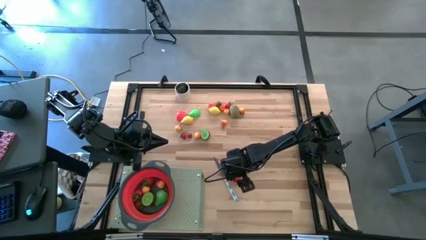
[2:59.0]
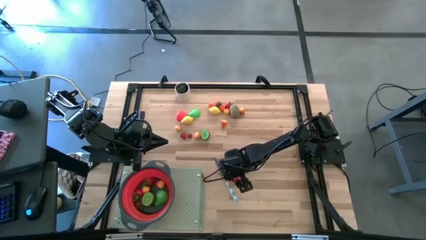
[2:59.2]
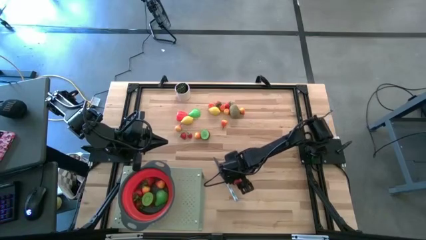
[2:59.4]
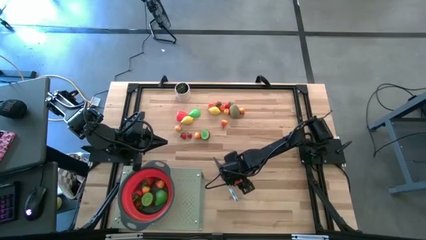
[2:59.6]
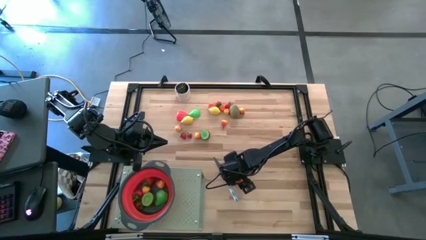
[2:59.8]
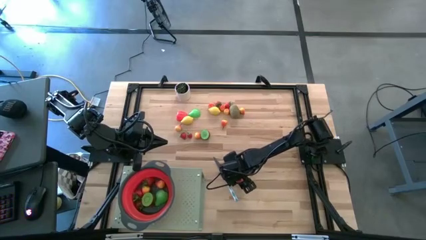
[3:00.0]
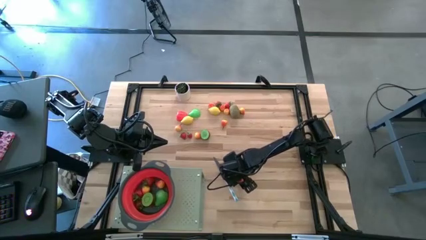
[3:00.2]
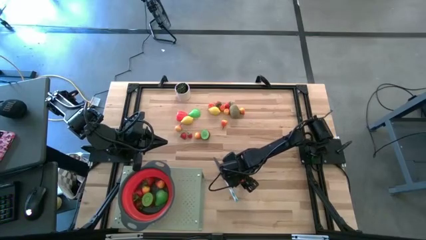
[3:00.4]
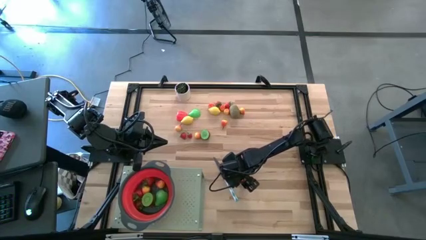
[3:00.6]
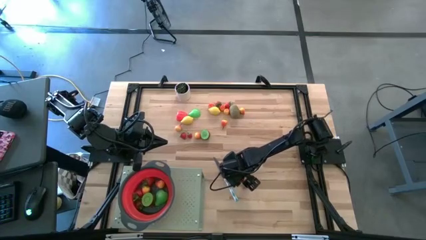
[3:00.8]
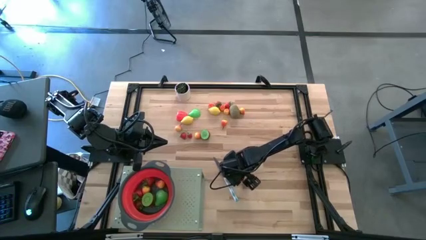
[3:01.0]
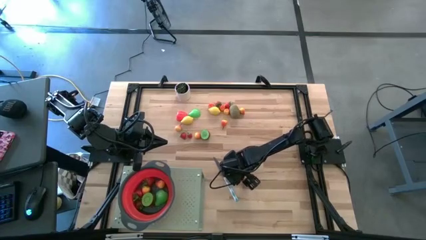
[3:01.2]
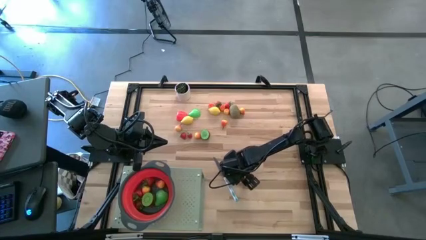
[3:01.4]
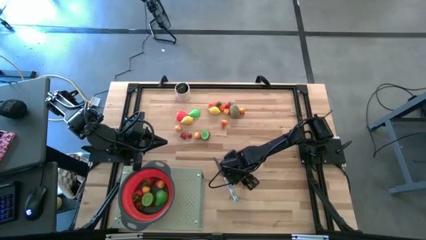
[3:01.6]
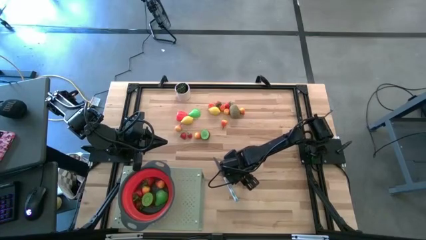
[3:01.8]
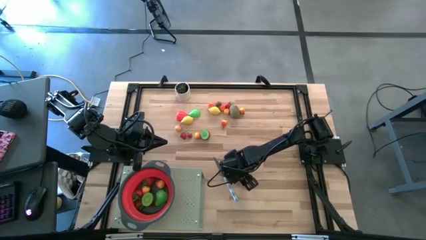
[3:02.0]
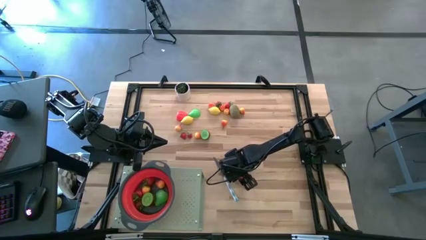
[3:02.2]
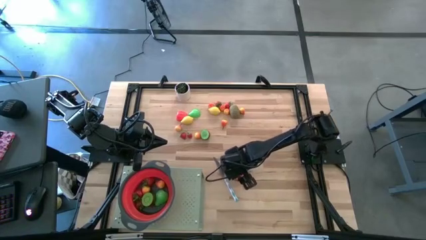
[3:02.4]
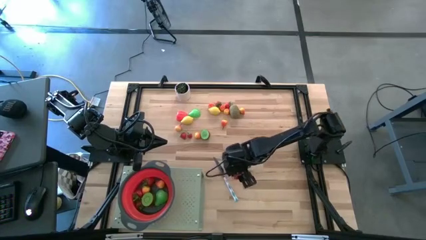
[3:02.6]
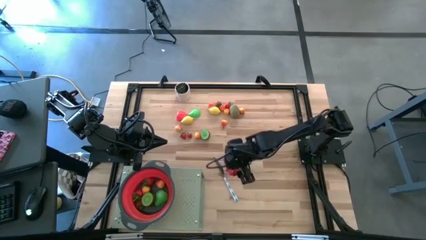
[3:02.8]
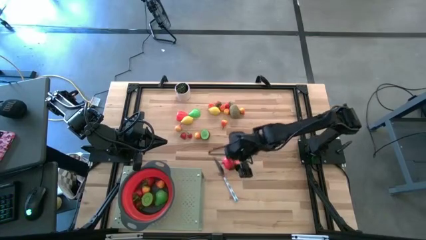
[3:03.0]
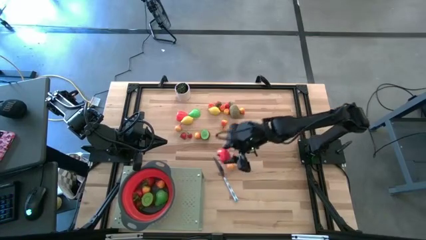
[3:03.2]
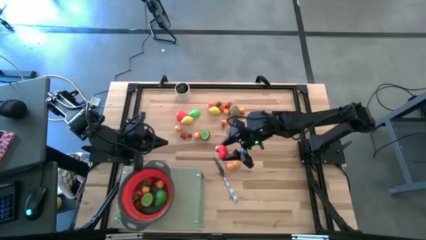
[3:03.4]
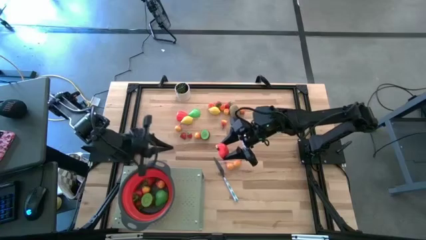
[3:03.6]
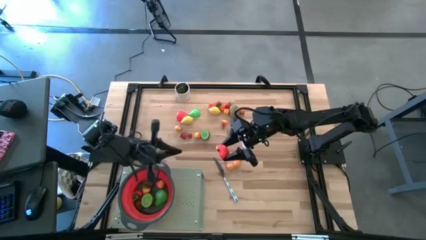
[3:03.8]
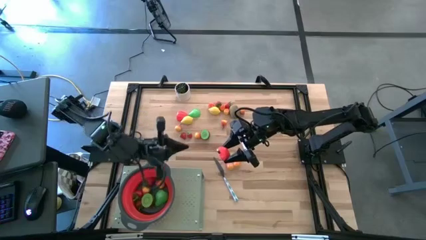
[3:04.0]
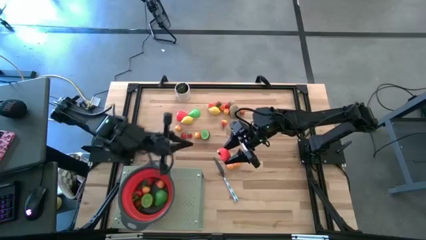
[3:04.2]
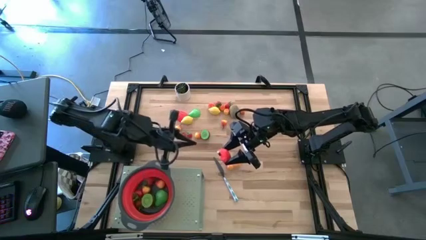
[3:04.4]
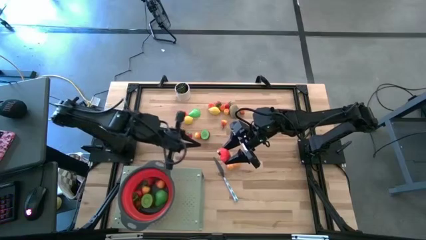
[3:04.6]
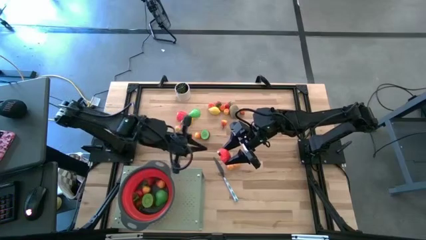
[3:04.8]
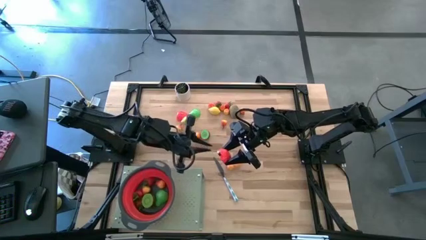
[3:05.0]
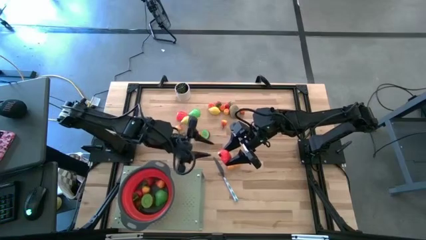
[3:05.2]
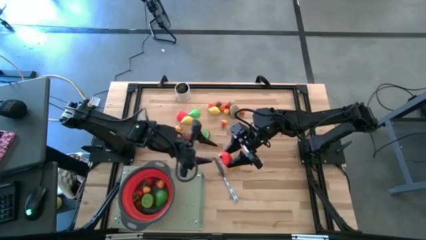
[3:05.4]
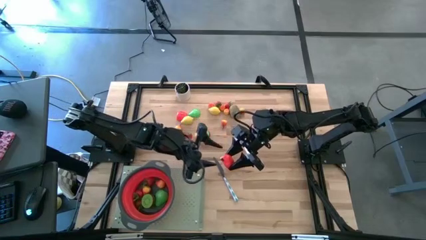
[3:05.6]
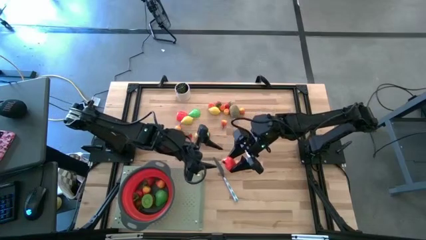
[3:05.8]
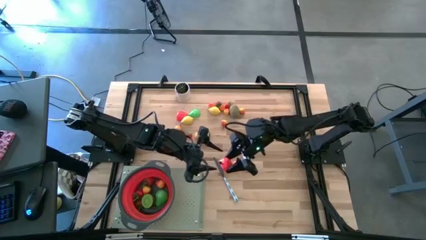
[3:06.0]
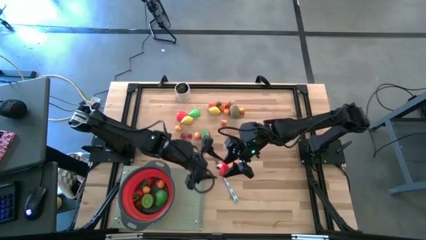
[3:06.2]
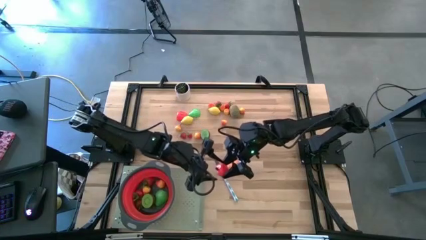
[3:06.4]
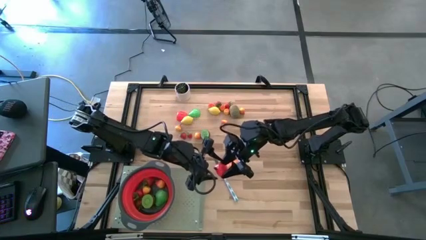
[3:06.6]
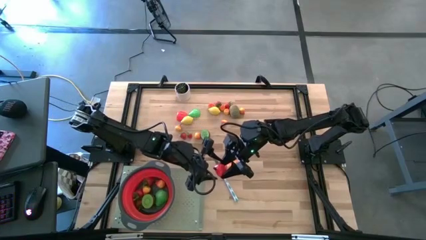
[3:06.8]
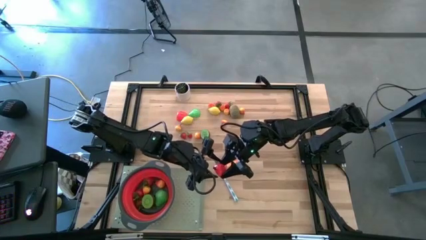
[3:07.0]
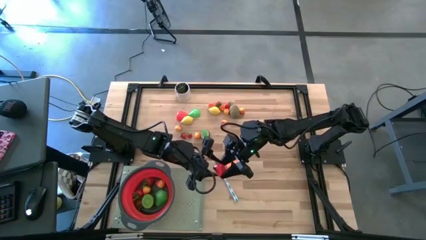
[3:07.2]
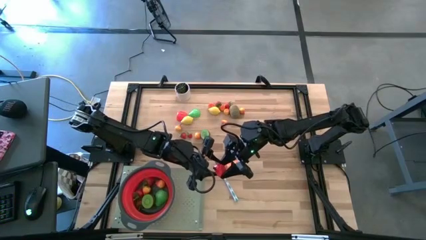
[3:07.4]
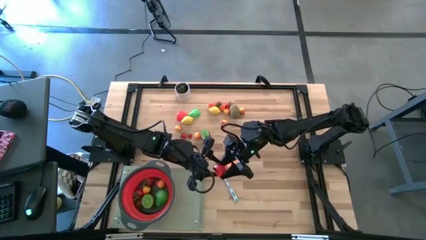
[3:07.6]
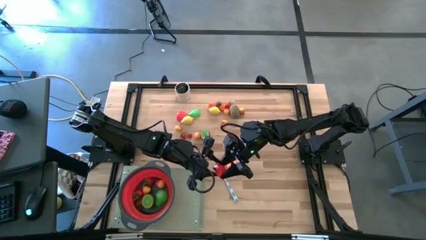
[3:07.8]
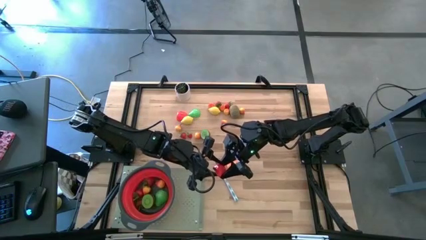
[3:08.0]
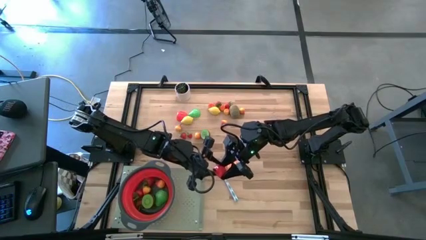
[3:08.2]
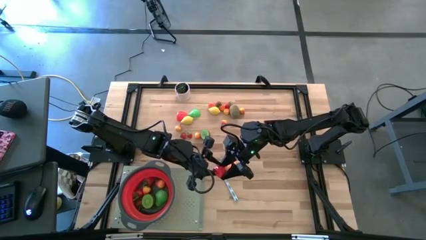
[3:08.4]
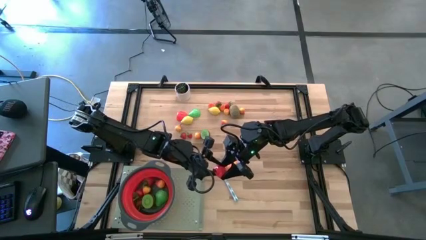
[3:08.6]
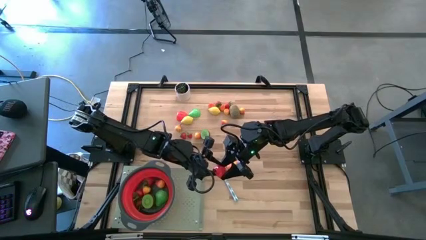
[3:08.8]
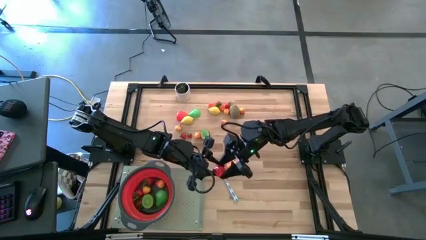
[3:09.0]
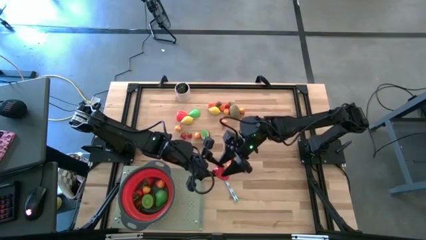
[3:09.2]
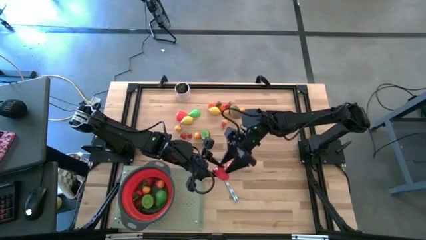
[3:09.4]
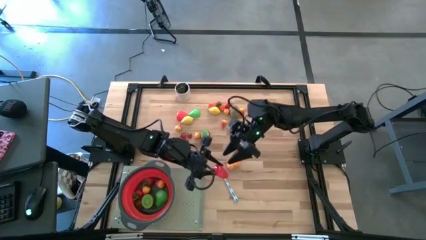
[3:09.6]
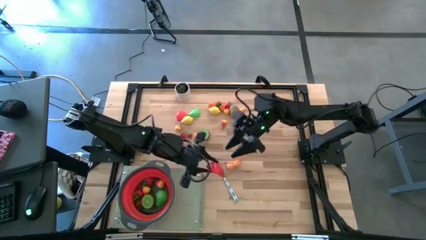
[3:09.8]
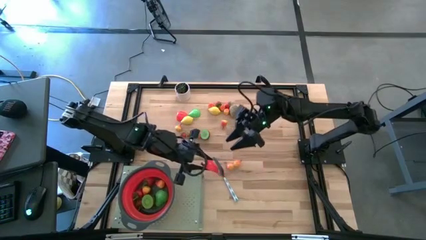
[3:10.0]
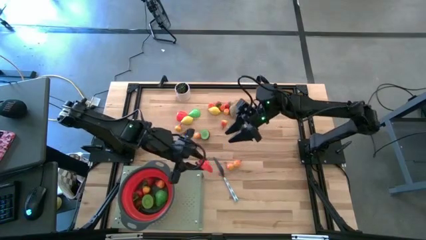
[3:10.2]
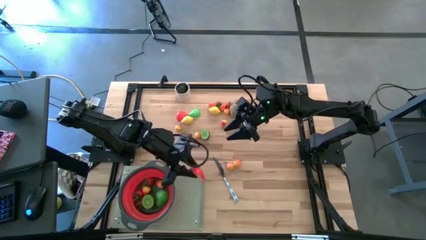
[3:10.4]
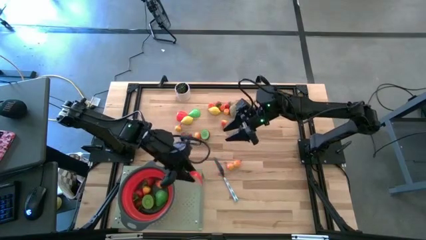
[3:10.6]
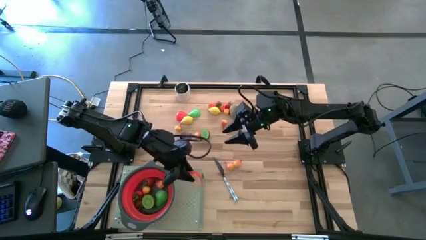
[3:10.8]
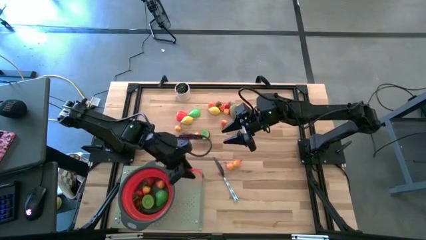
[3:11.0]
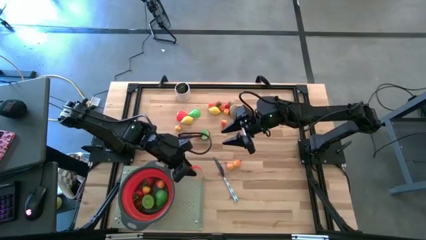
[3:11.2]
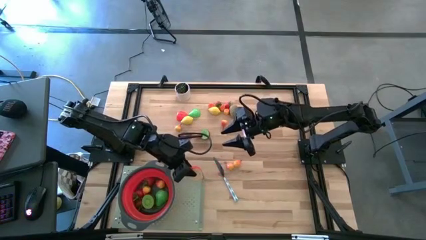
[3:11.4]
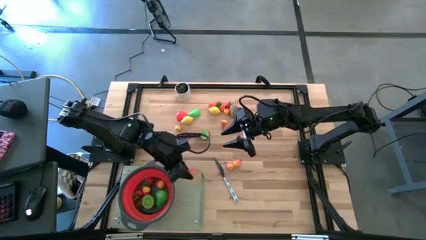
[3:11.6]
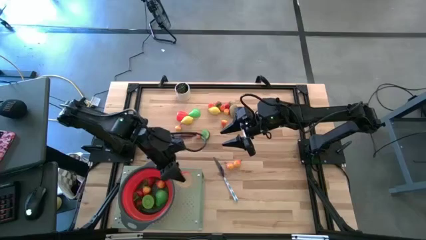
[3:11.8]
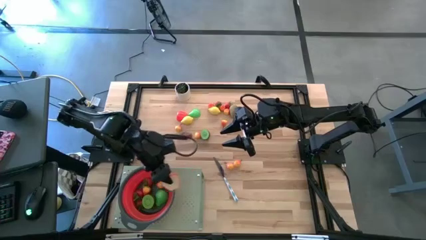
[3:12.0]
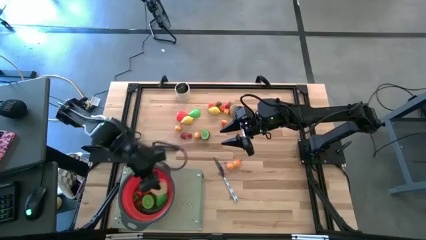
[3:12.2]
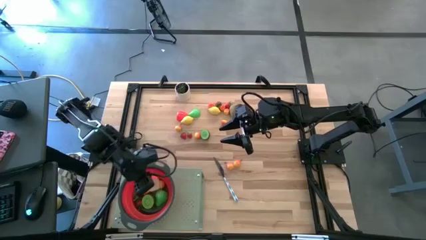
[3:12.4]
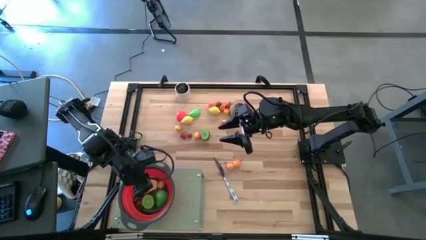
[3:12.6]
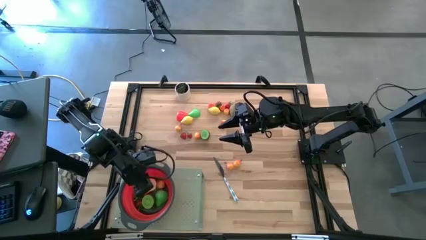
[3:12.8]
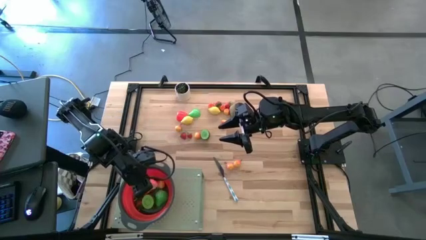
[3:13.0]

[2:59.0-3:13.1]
Task: Pick & Place Fruit
Put the half apple into the red strainer bowl on the shelf

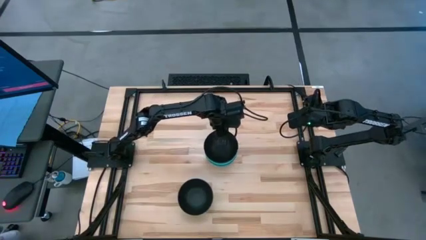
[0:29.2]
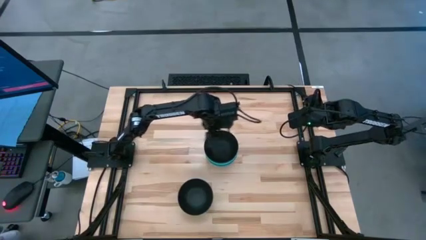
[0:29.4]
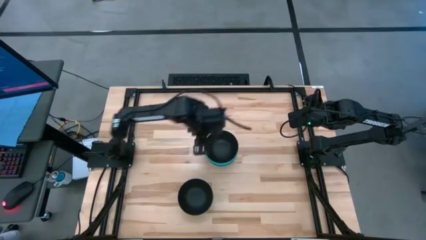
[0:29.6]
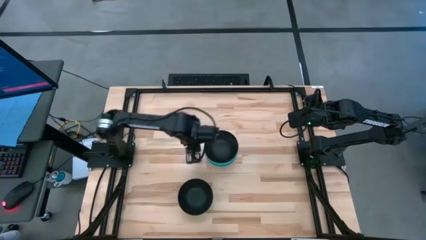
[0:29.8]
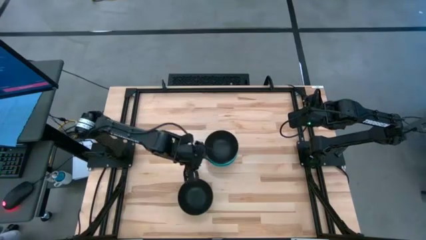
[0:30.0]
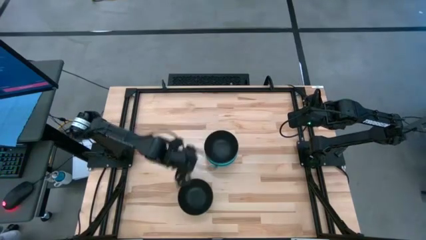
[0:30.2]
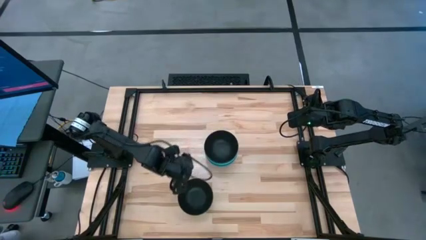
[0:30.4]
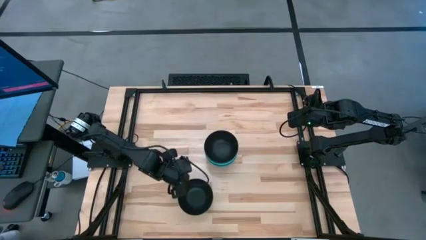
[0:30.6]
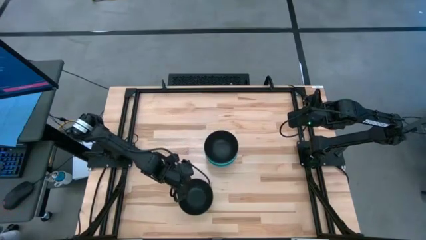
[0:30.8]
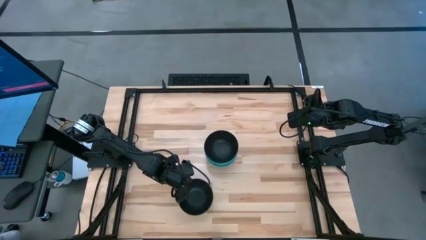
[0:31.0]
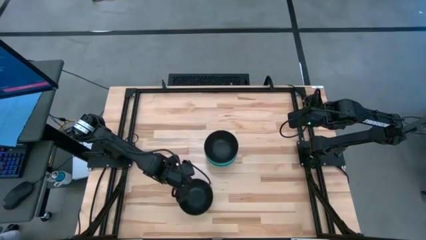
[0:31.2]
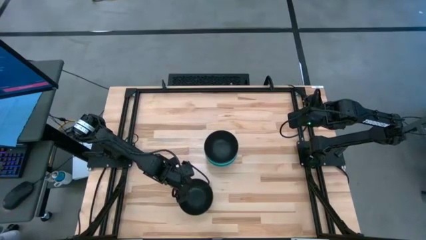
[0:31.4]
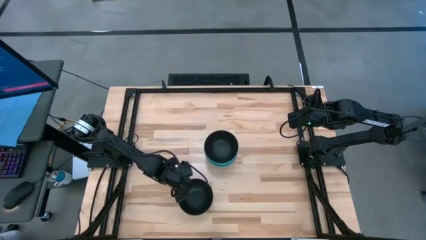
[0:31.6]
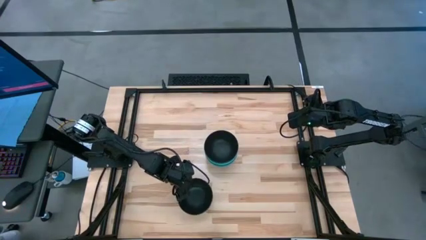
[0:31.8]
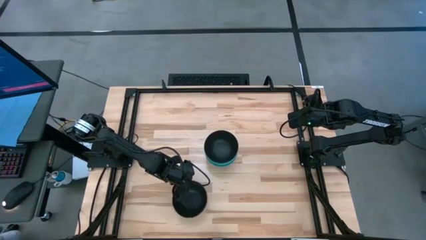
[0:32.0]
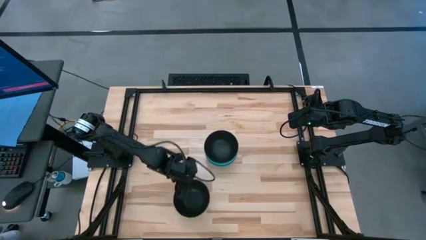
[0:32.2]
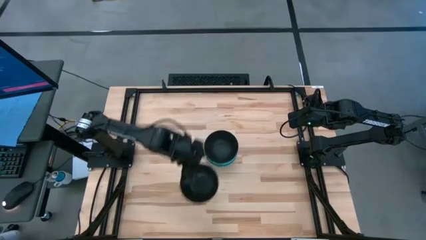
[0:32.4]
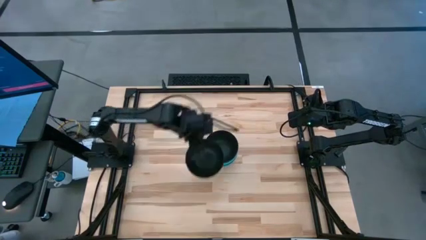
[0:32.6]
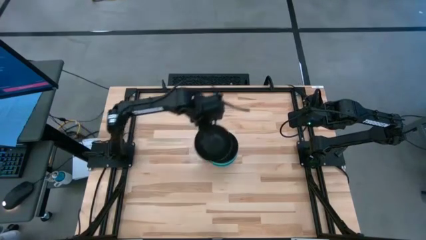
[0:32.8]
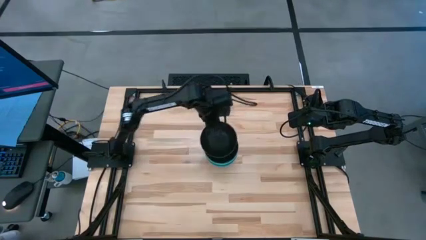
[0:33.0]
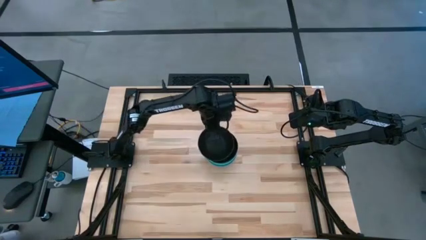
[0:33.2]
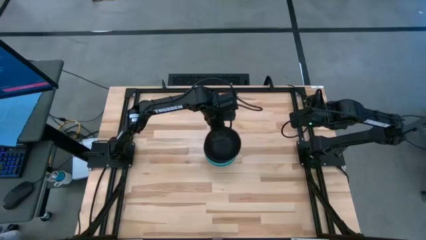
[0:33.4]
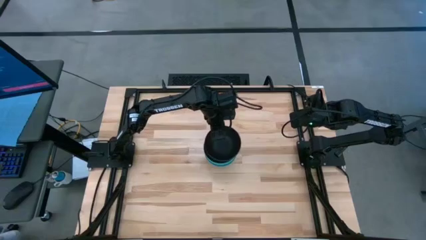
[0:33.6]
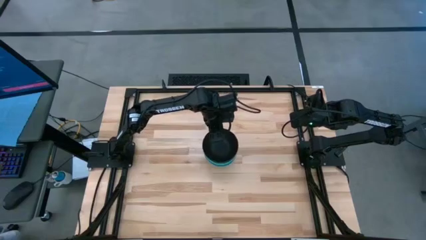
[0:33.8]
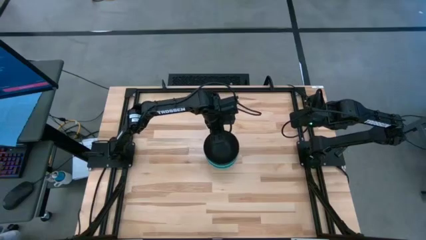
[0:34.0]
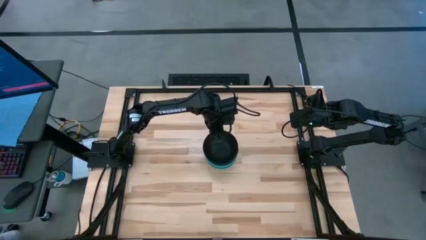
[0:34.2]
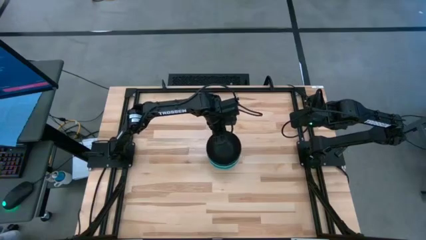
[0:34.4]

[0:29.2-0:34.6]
Task: Nest bowls inside each other
Stack the black bowl on the black bowl
